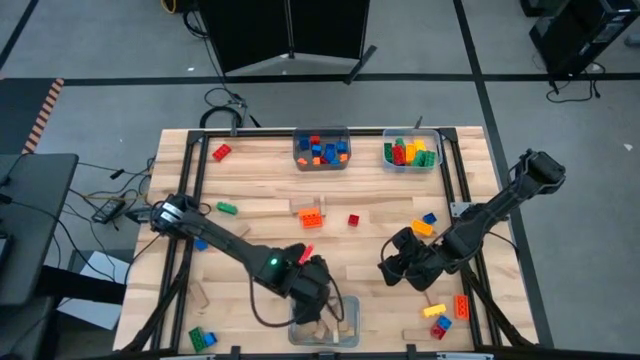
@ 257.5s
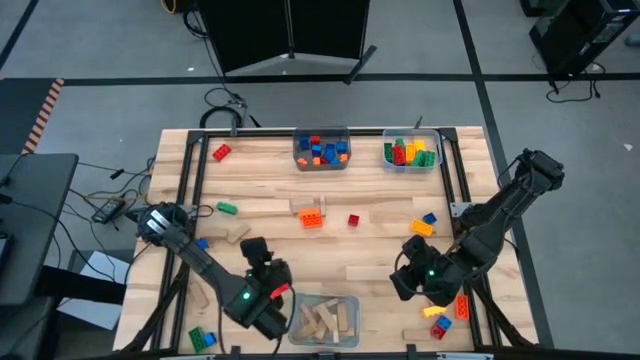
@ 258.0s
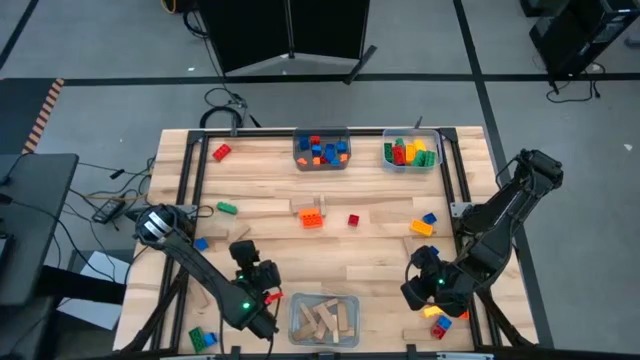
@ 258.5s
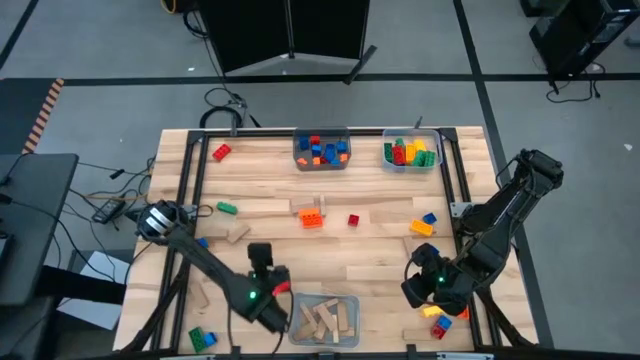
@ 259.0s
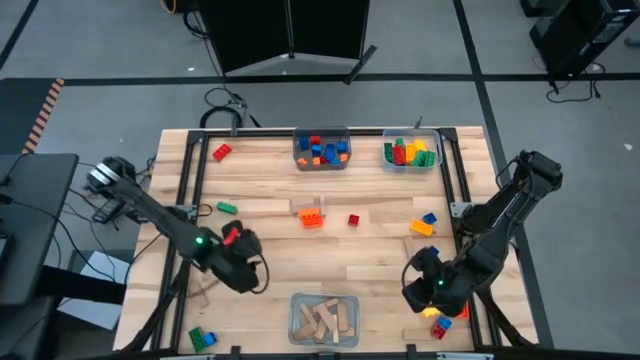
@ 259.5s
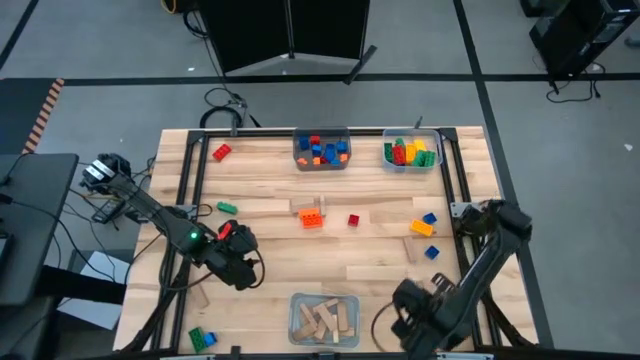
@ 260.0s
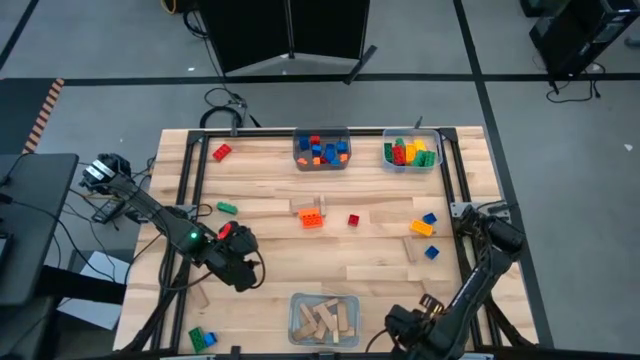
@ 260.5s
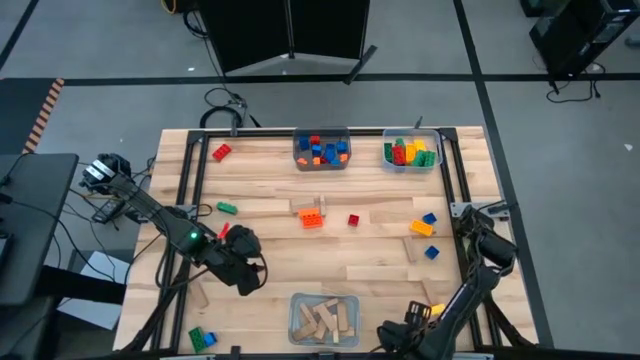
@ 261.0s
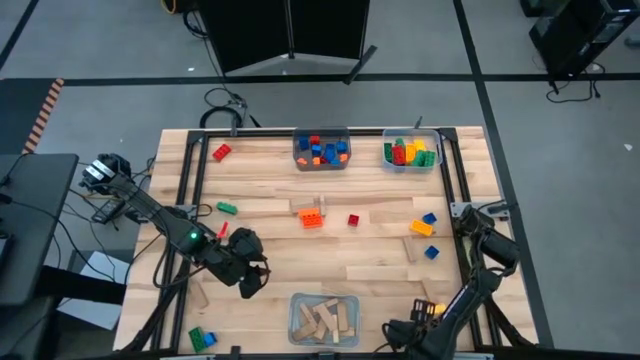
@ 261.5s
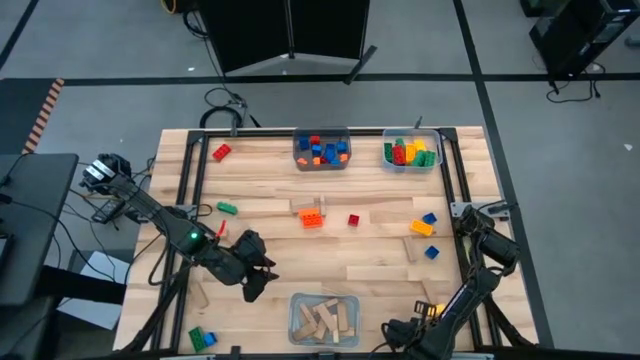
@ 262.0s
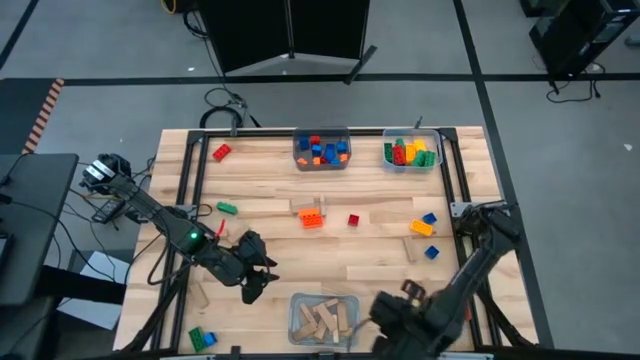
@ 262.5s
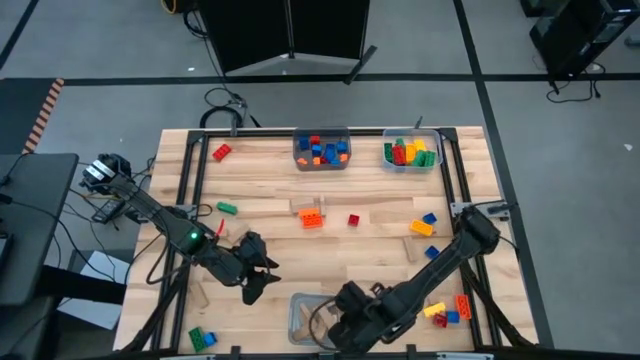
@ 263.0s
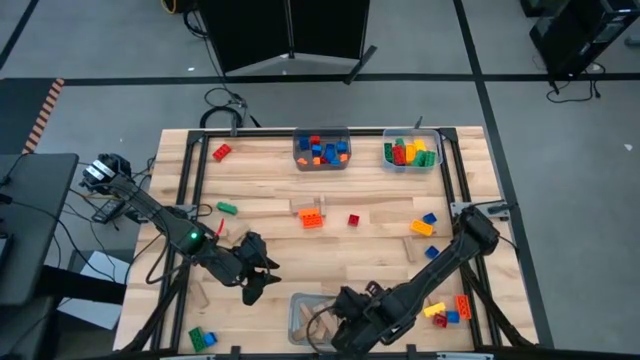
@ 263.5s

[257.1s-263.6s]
Task: Sort blocks by size
Put the brown block into the gray bin

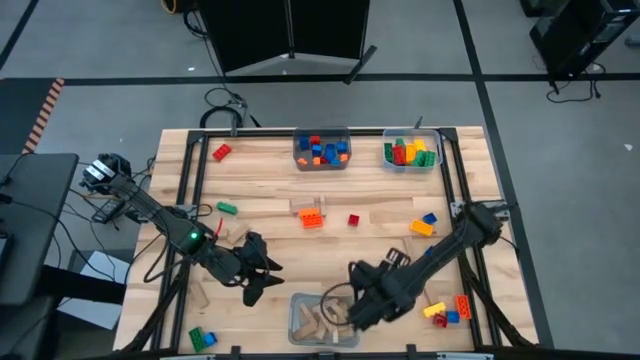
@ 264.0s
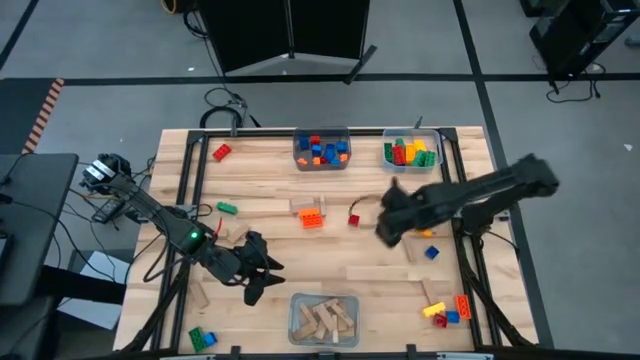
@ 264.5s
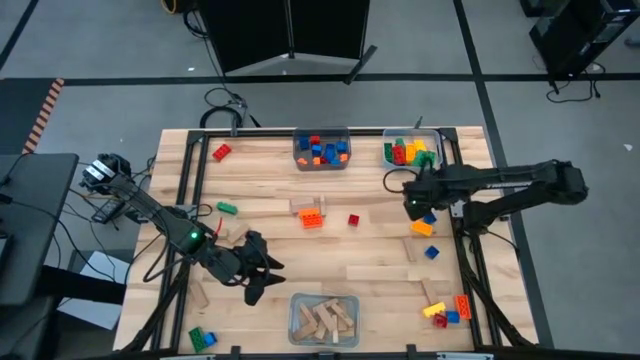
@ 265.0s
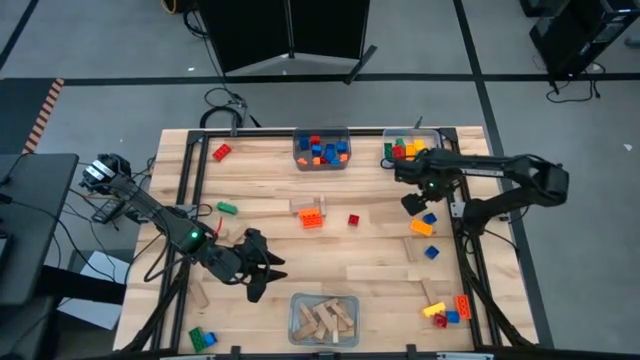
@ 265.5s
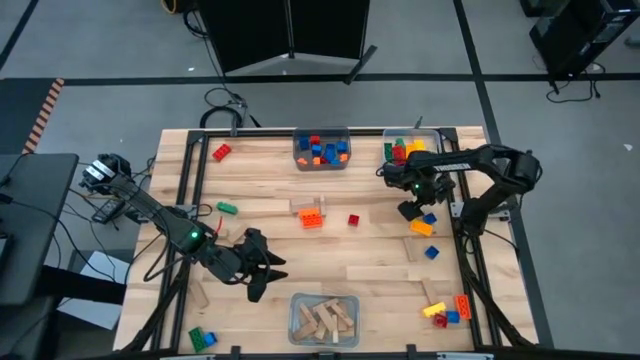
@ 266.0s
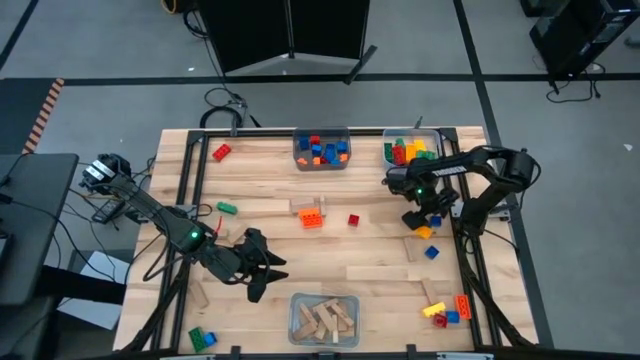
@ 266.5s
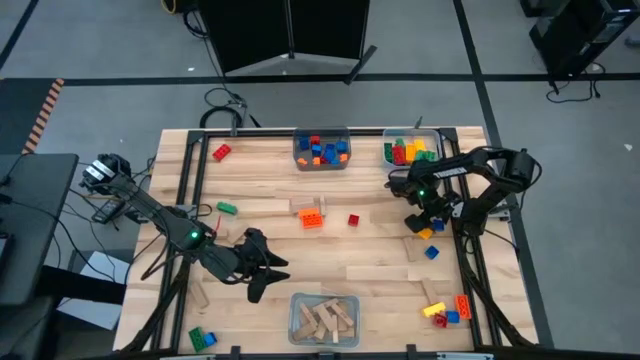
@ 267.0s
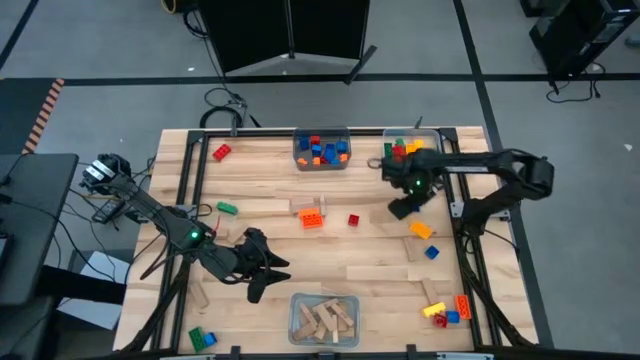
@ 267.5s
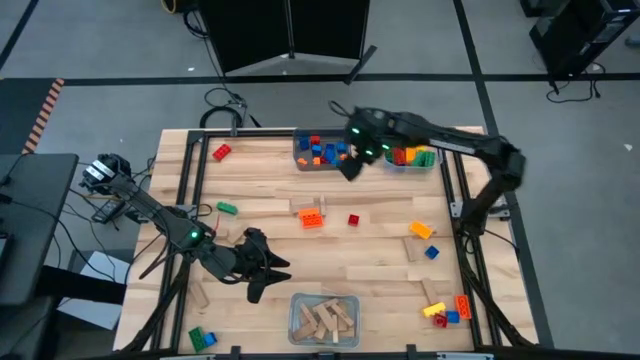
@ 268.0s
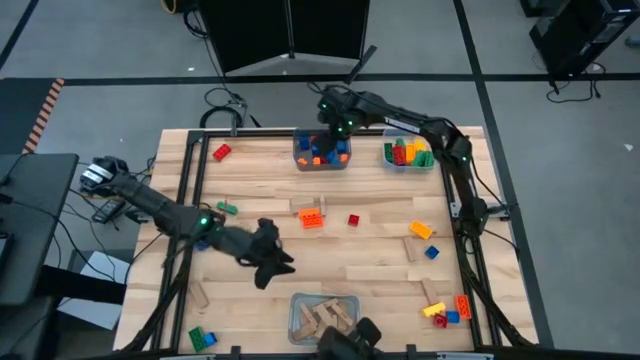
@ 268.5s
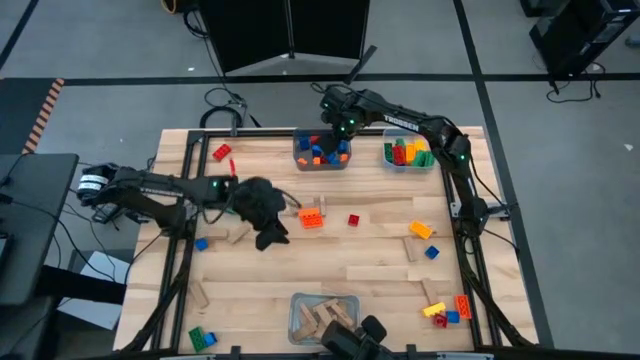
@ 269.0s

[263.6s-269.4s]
Put the small blue game piece into the black bin

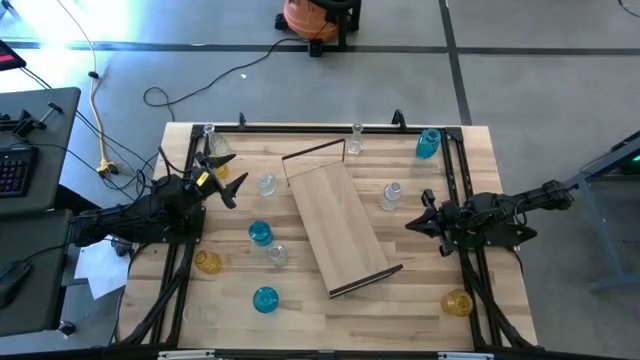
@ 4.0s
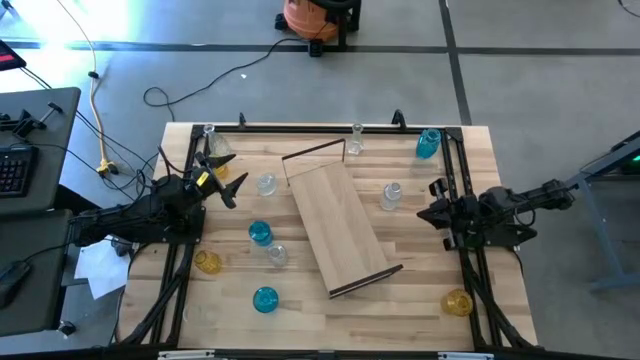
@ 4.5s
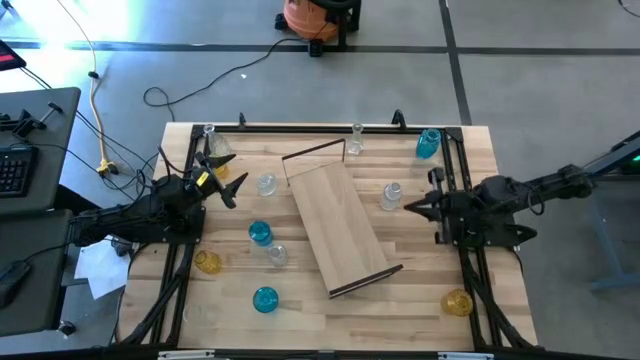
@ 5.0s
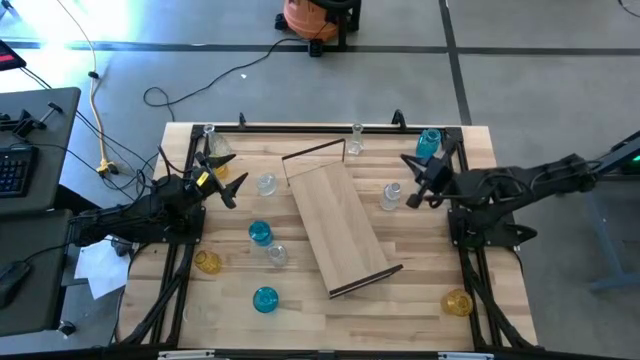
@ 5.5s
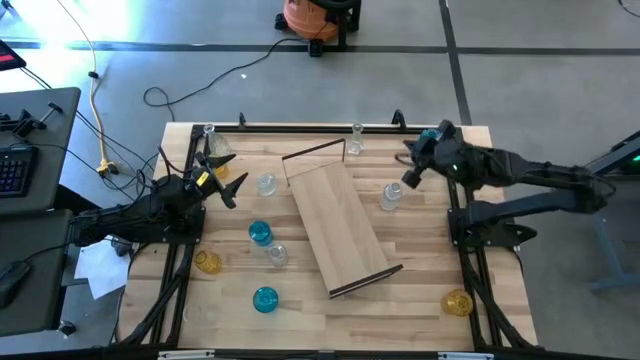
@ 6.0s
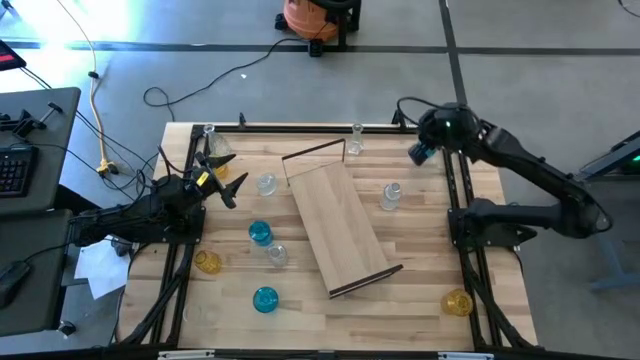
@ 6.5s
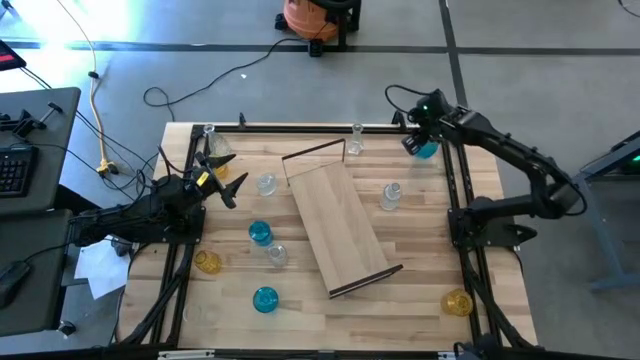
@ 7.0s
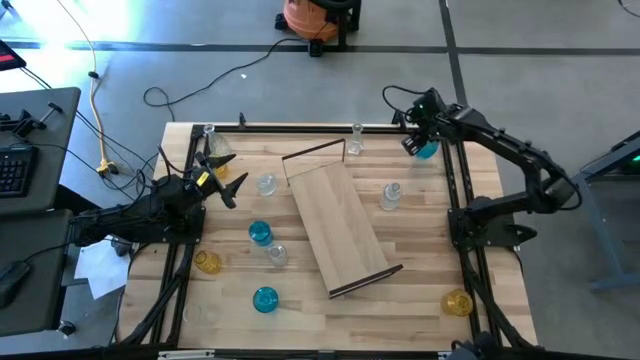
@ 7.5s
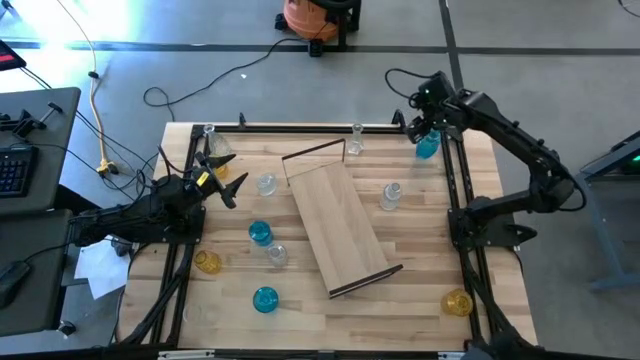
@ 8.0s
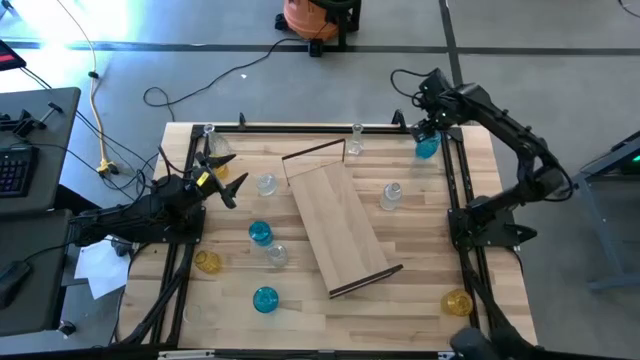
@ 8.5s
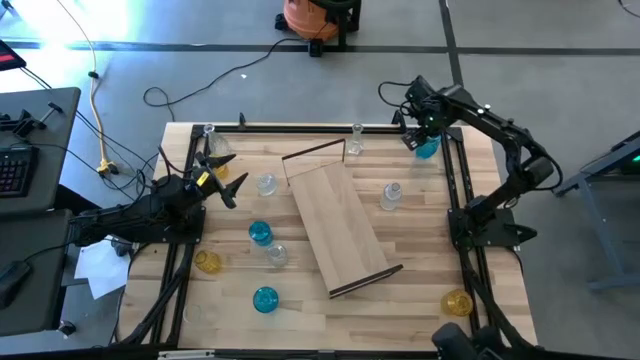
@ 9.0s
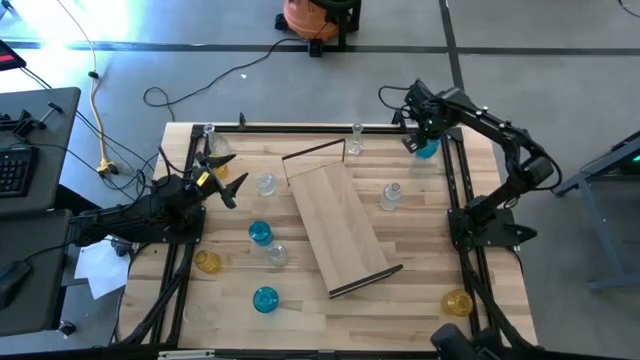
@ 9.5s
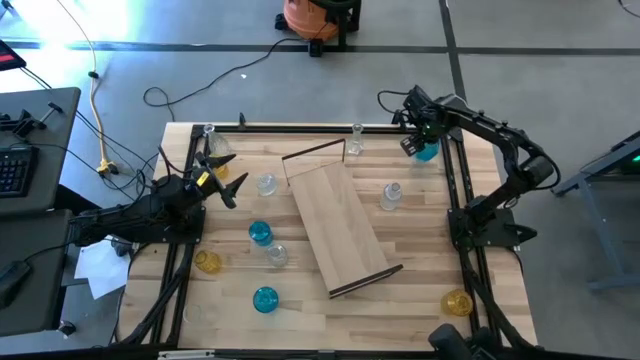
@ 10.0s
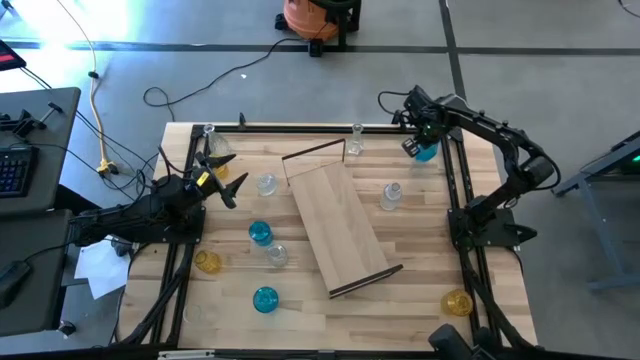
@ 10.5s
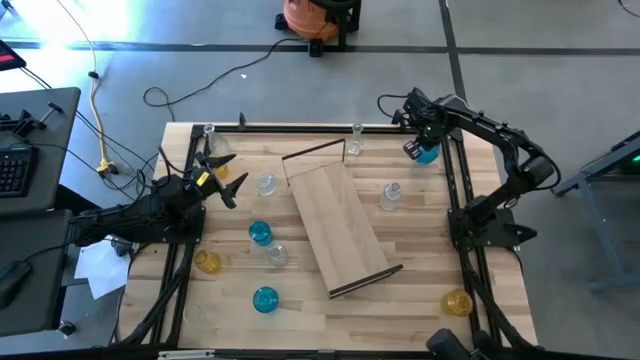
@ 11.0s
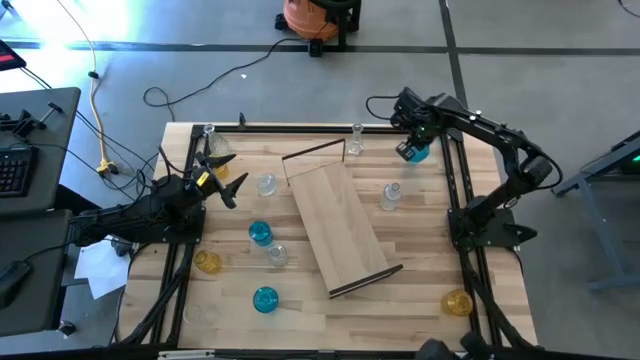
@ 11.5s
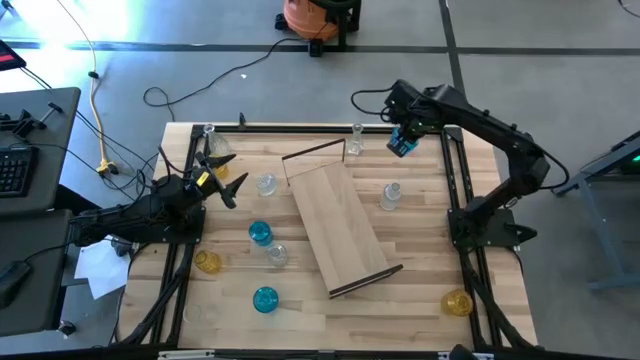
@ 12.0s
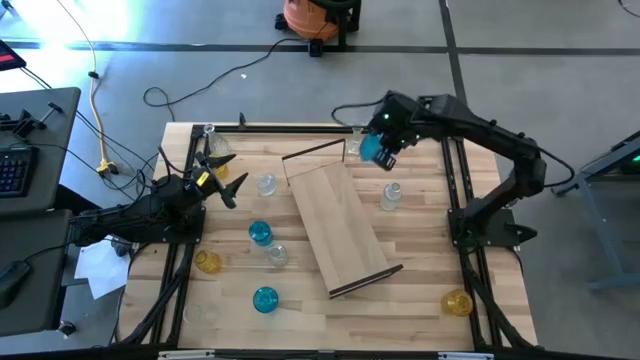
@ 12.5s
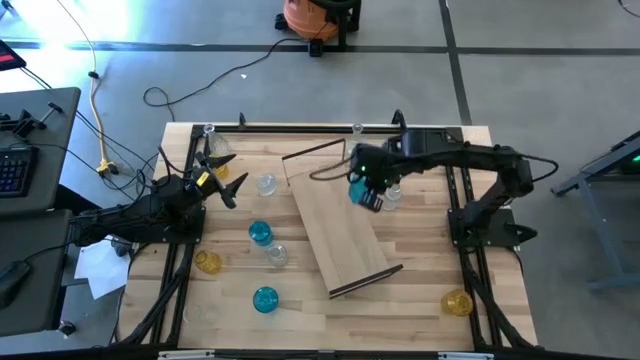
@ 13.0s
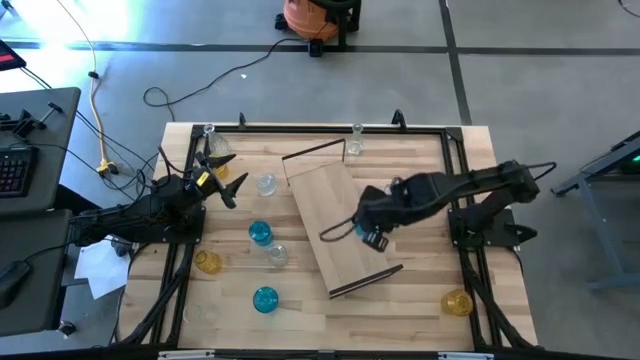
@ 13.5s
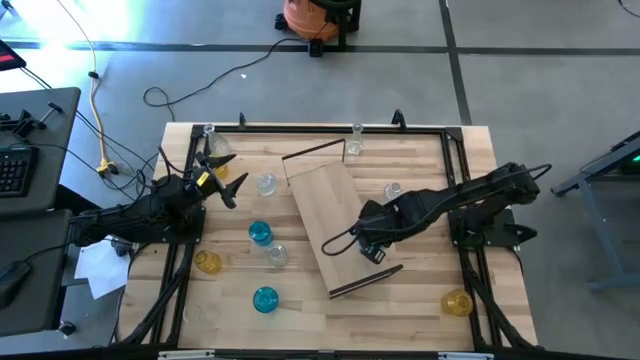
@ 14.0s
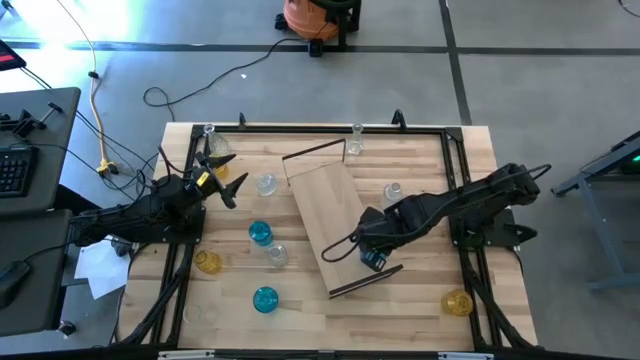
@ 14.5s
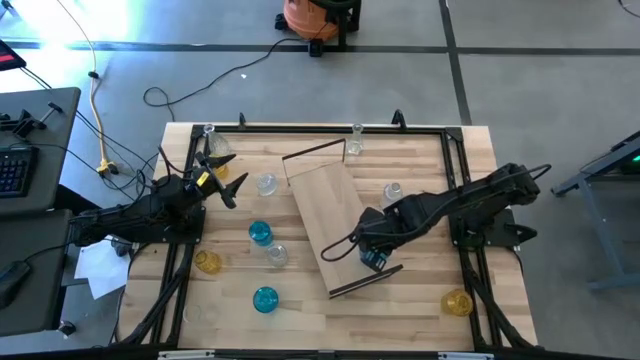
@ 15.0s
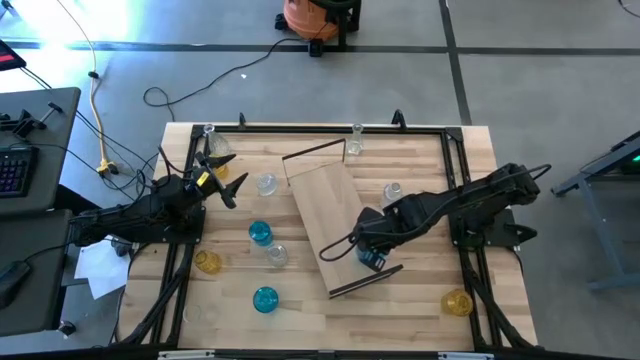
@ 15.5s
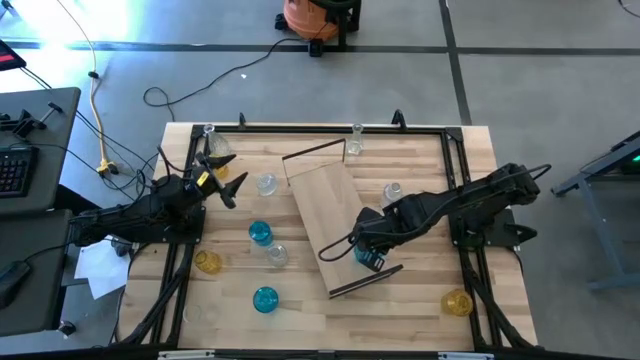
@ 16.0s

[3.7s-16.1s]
Task: sort vases onto shelf
Put the blue crystal vase on the shelf
